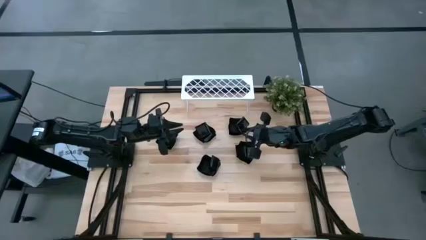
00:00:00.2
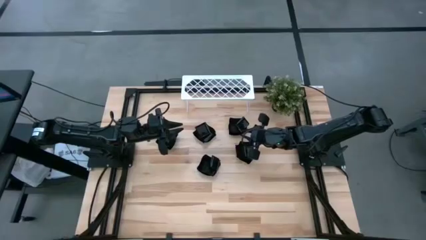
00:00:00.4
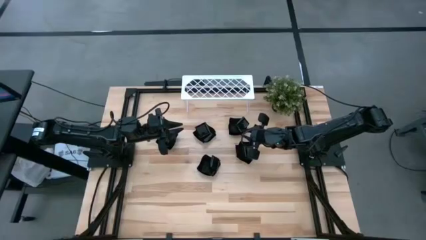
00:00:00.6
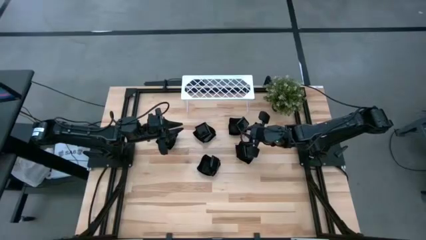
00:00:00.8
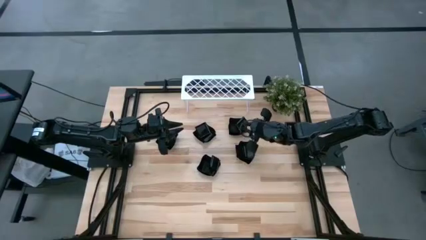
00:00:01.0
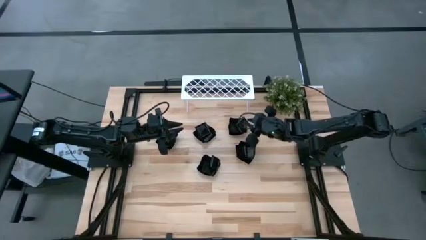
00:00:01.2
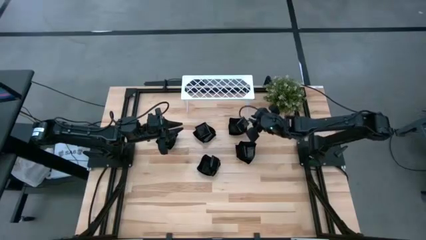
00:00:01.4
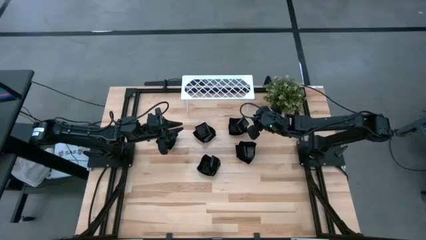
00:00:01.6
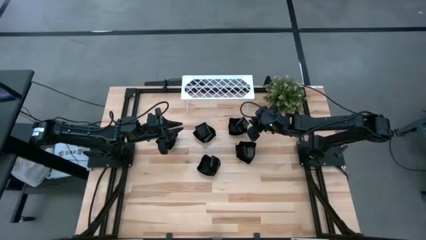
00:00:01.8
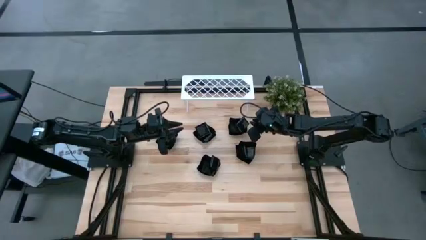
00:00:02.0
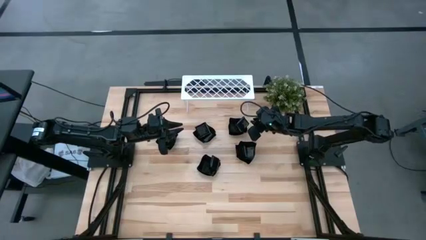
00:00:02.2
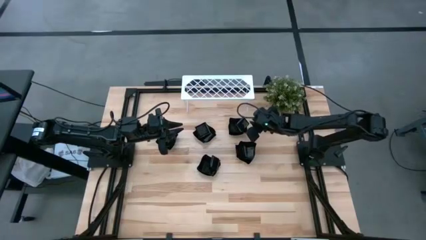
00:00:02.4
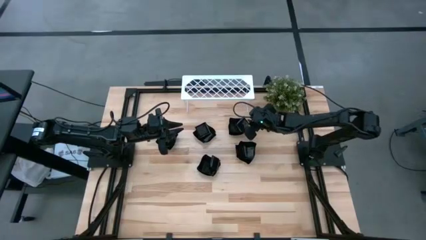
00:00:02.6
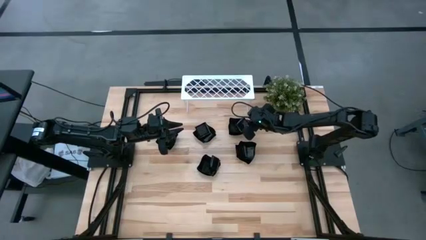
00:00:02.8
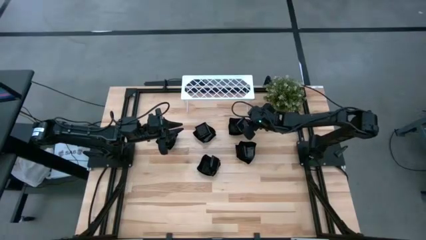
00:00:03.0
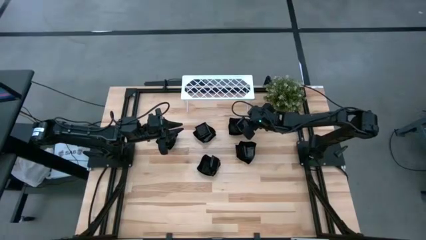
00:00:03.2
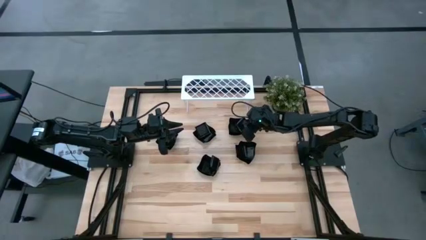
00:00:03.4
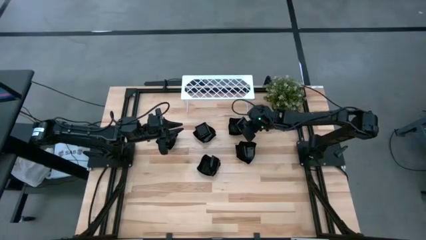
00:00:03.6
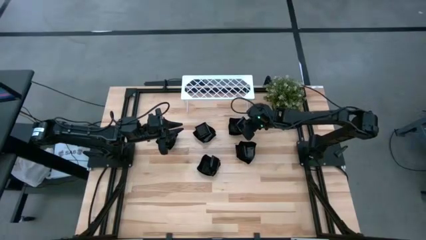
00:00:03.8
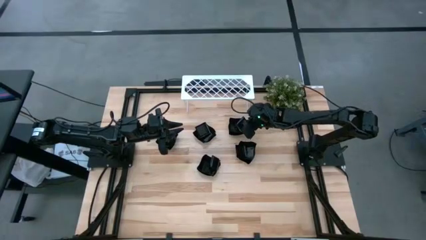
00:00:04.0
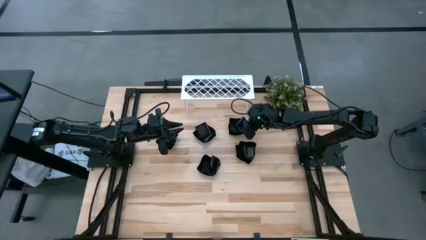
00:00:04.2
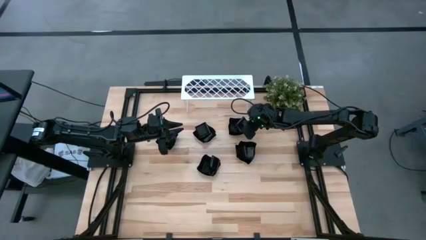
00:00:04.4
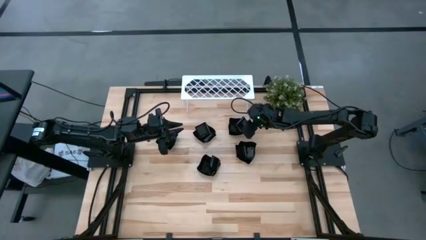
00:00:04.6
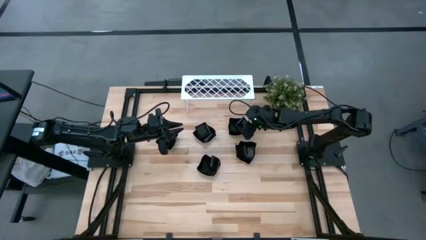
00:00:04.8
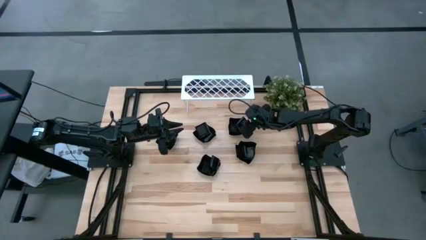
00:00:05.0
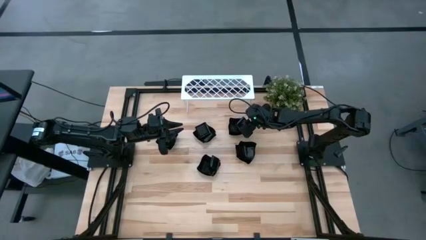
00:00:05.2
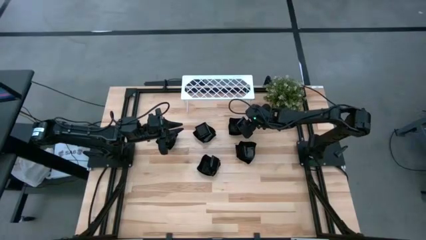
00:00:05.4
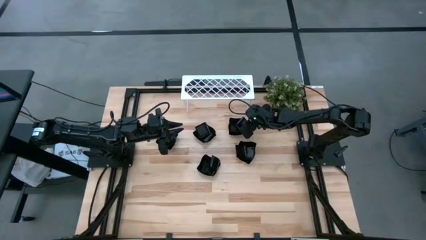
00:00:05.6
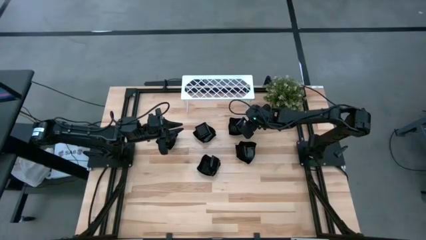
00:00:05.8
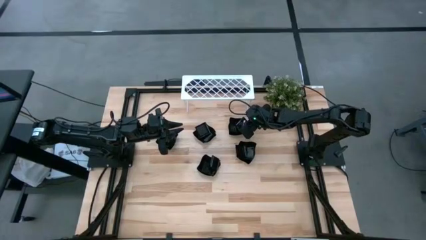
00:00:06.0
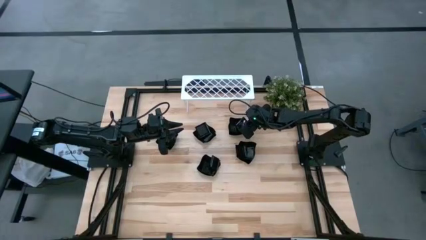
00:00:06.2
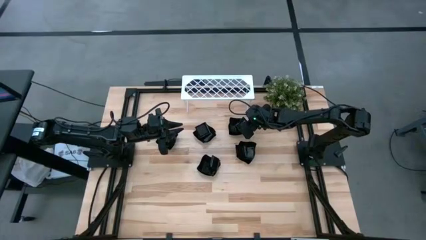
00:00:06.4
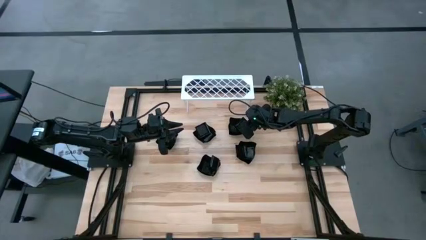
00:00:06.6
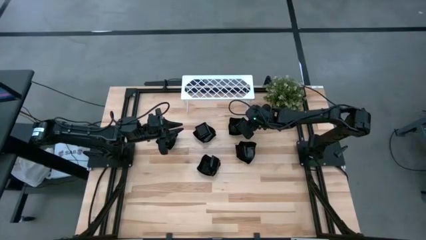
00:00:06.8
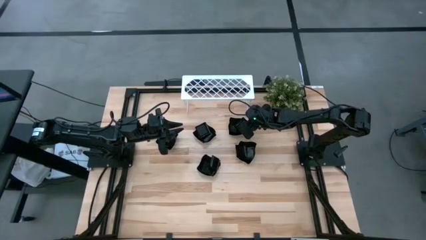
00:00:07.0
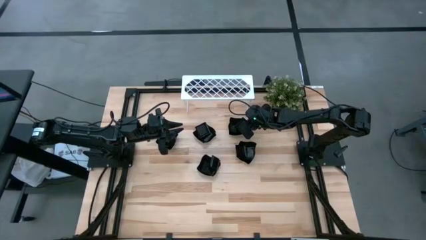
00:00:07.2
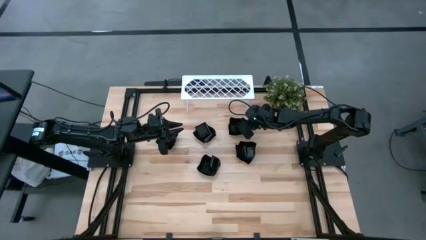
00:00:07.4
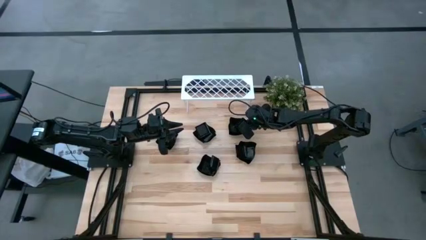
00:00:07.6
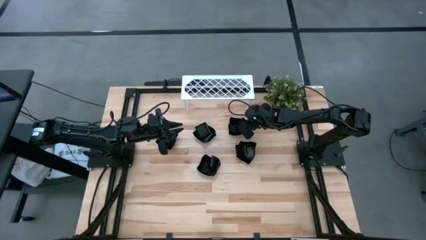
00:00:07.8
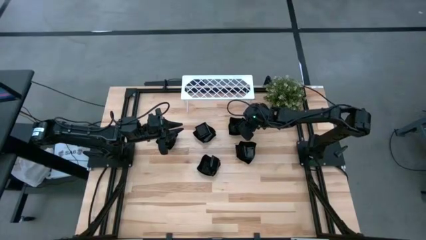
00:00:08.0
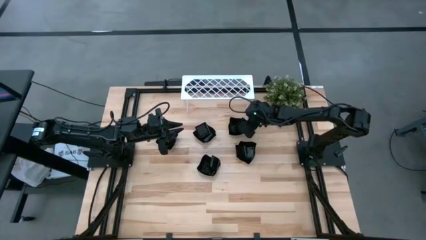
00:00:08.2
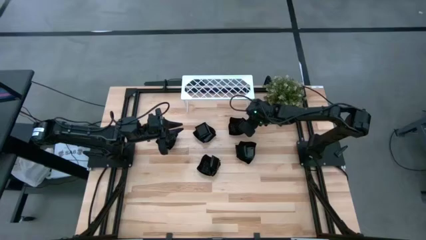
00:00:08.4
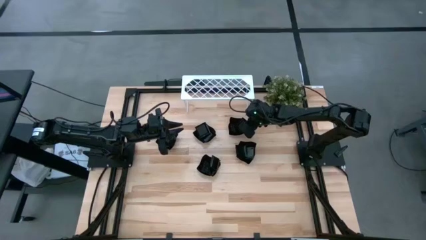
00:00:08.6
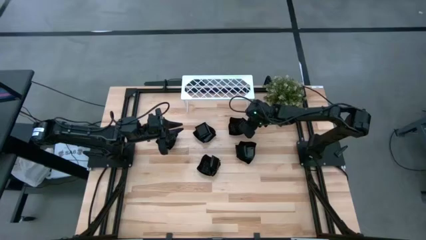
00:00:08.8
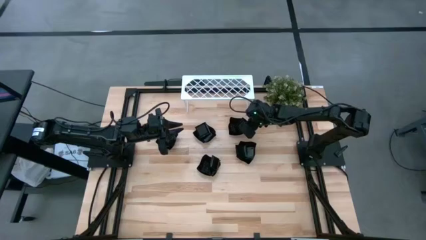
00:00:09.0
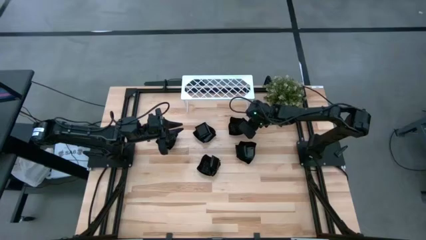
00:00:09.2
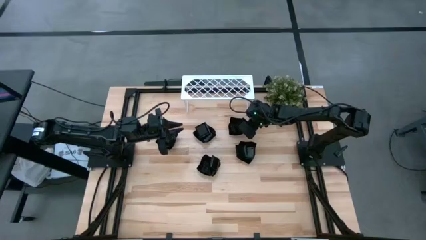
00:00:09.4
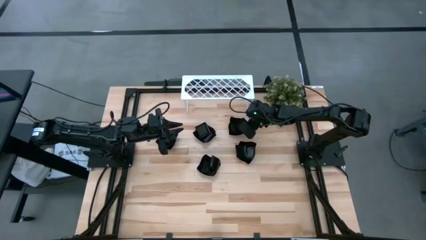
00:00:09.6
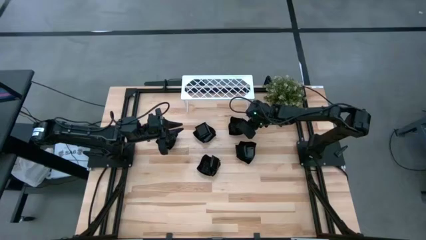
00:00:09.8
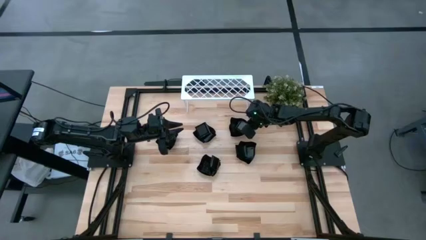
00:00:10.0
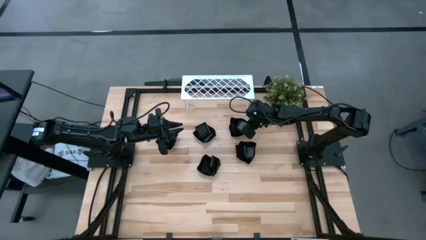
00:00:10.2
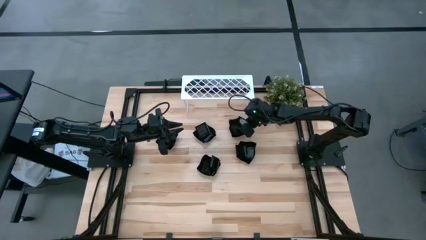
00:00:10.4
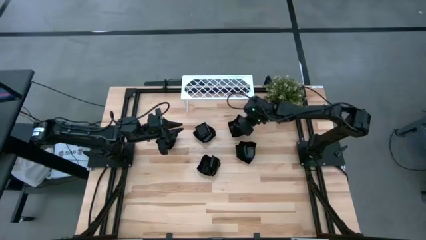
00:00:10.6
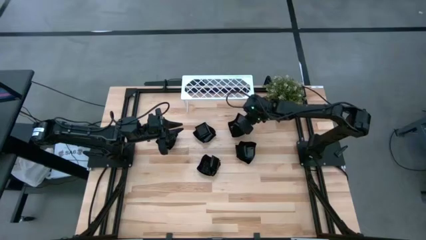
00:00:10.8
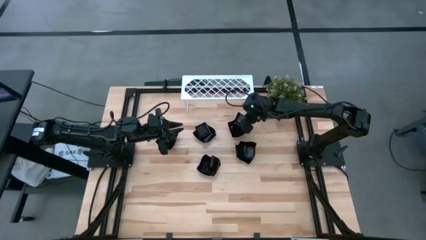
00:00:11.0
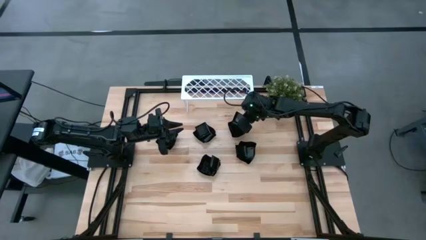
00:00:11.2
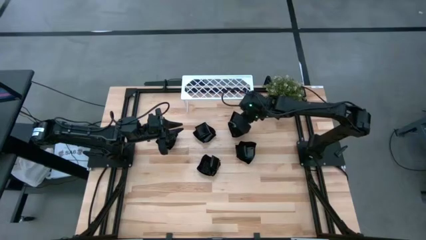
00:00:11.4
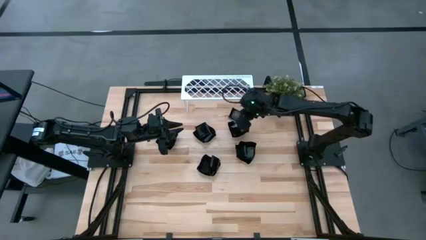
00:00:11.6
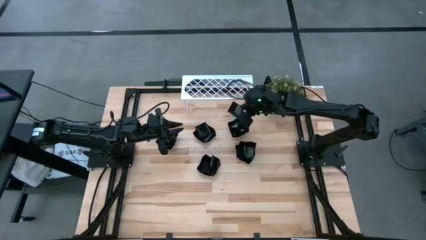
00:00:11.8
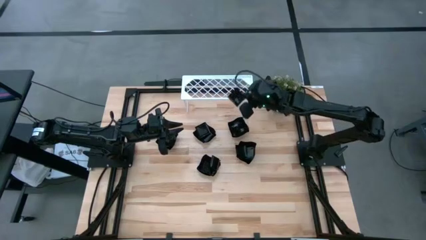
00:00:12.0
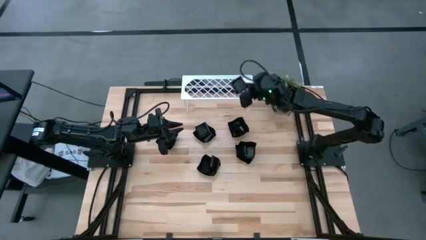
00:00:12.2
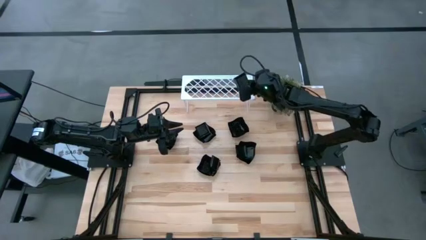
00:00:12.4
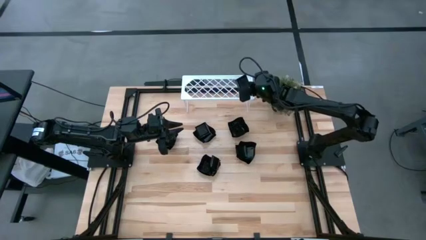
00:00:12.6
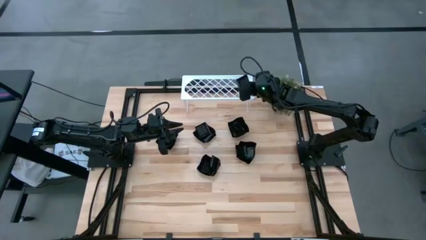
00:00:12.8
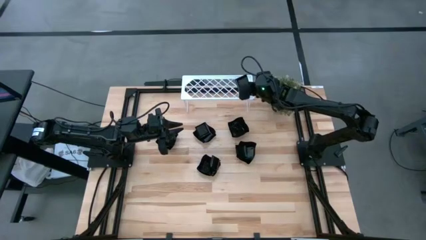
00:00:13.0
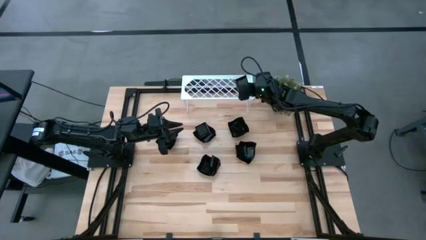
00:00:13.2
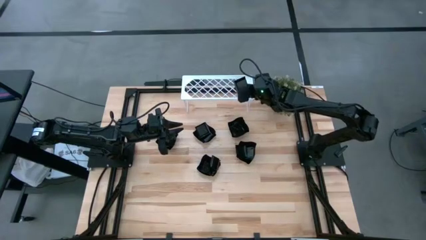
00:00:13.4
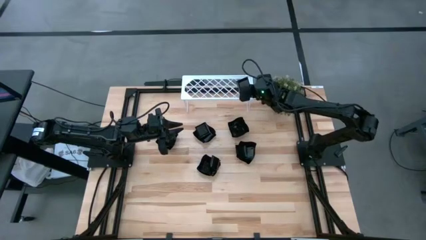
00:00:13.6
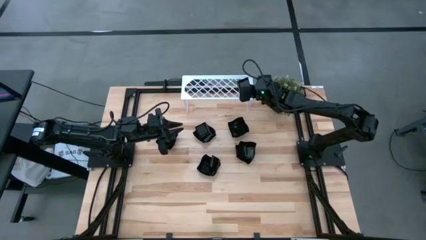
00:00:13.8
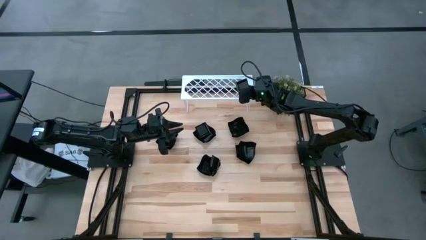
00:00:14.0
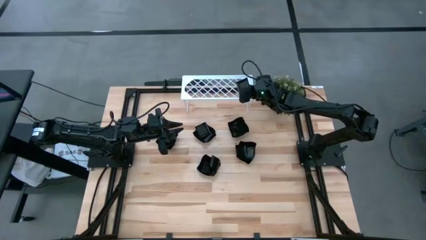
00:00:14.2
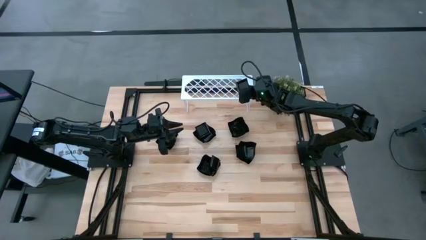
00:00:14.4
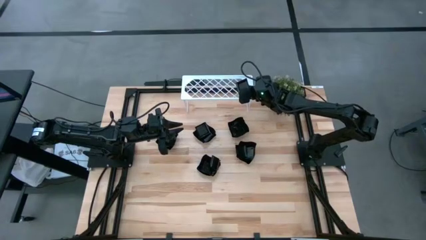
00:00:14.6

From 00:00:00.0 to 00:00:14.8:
Task: Pick & Place Mini shaped plates
Put the black square plate on the shelf
